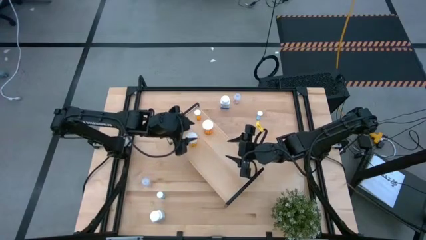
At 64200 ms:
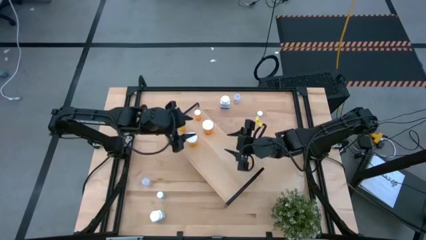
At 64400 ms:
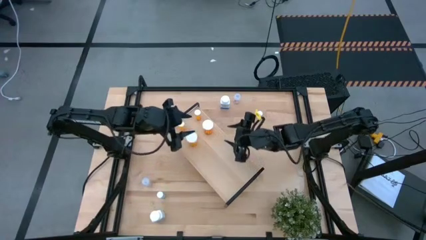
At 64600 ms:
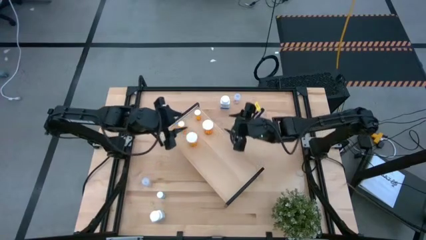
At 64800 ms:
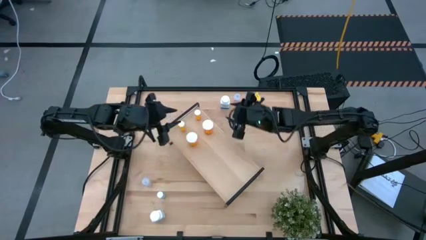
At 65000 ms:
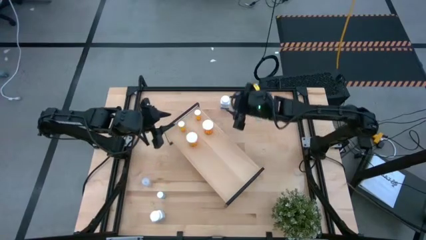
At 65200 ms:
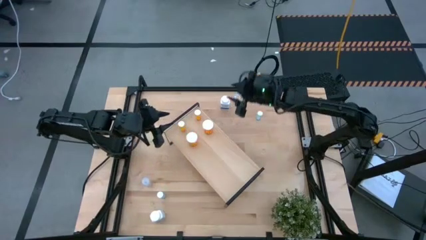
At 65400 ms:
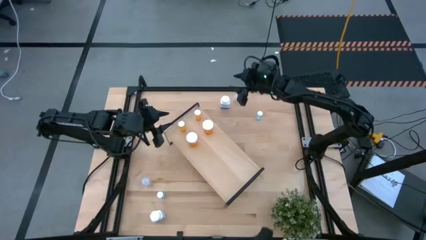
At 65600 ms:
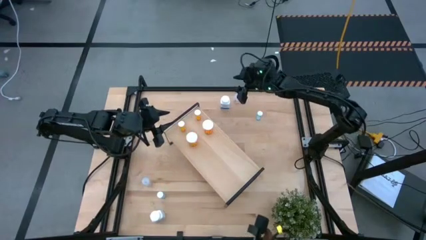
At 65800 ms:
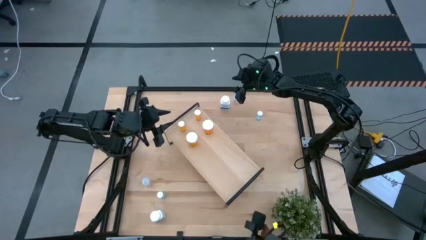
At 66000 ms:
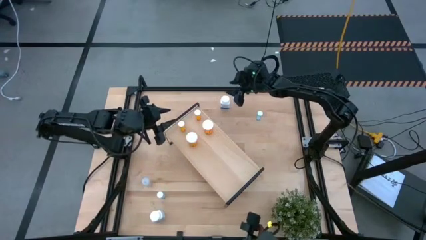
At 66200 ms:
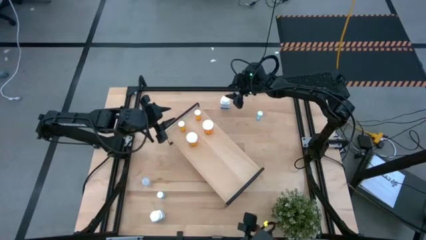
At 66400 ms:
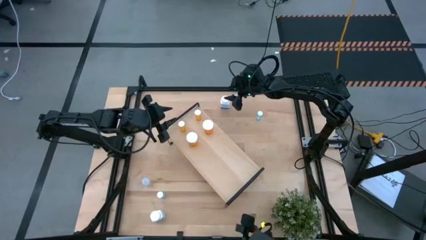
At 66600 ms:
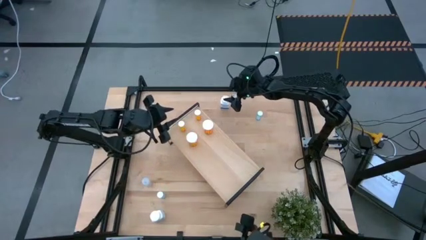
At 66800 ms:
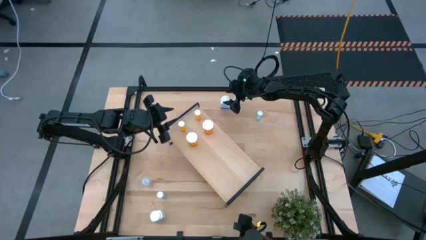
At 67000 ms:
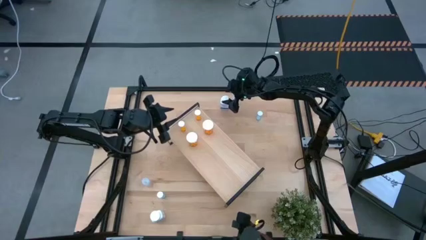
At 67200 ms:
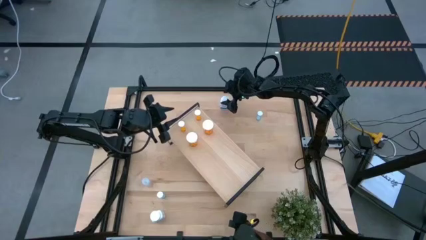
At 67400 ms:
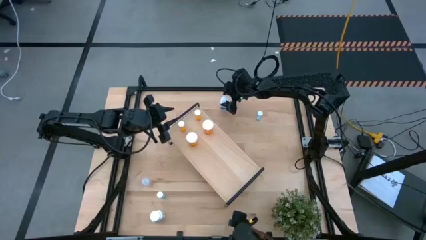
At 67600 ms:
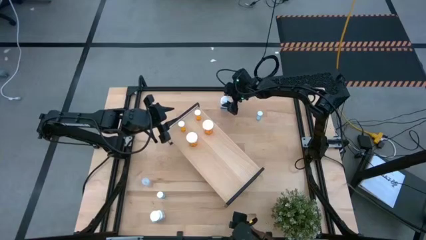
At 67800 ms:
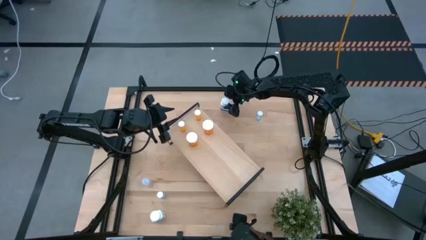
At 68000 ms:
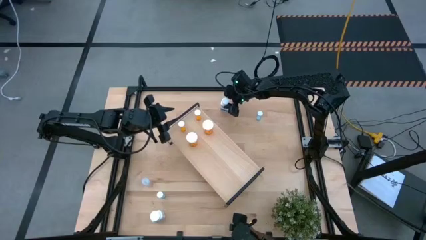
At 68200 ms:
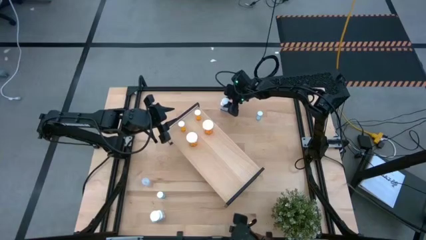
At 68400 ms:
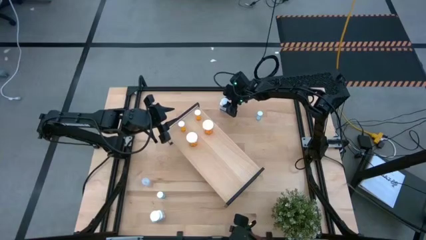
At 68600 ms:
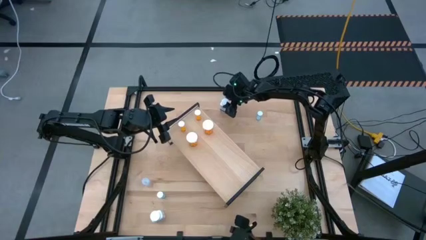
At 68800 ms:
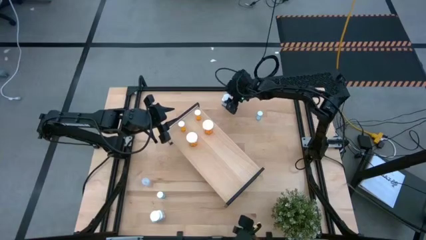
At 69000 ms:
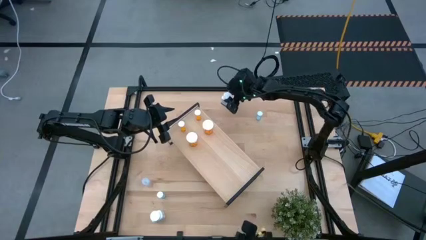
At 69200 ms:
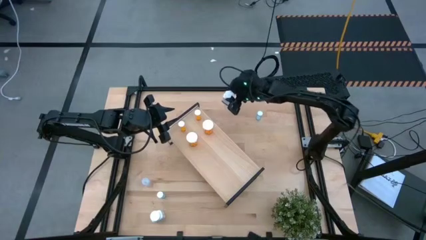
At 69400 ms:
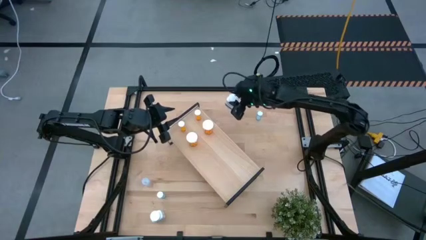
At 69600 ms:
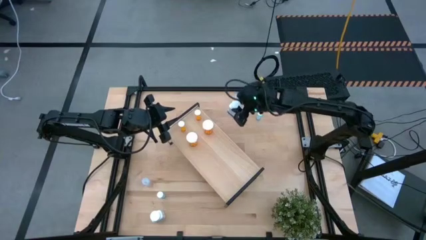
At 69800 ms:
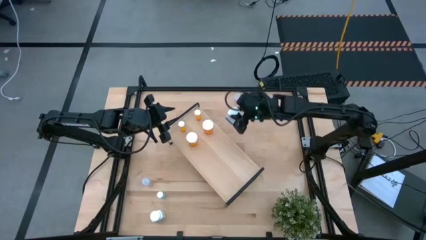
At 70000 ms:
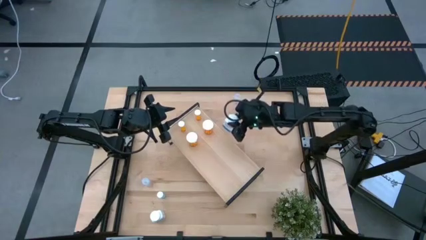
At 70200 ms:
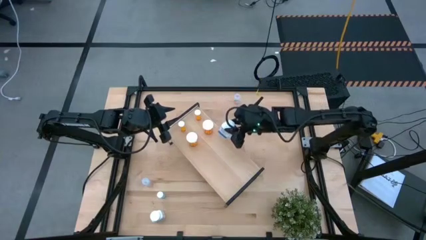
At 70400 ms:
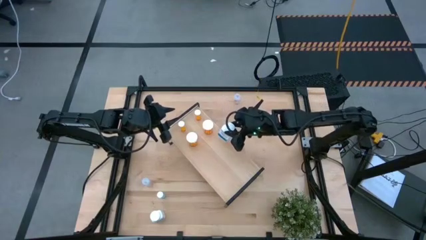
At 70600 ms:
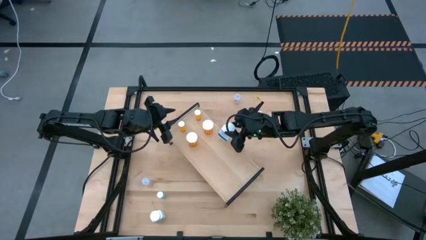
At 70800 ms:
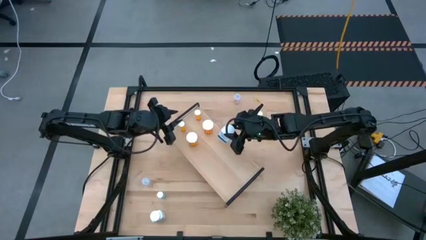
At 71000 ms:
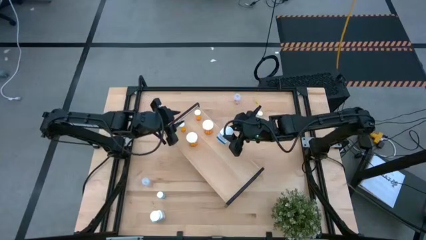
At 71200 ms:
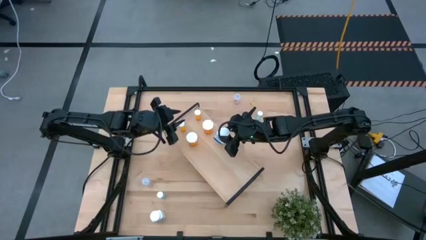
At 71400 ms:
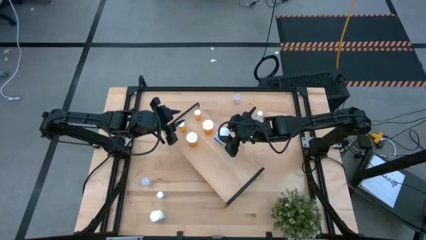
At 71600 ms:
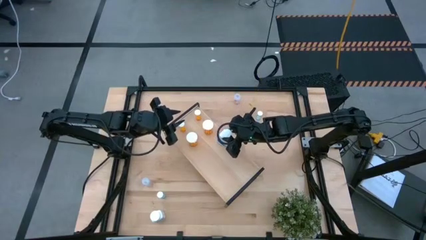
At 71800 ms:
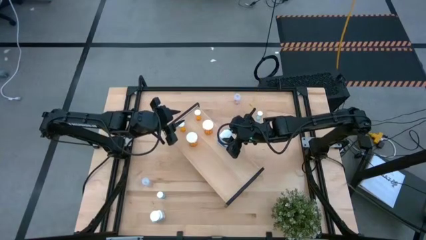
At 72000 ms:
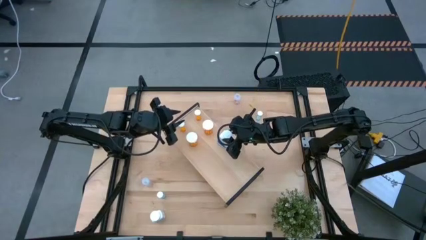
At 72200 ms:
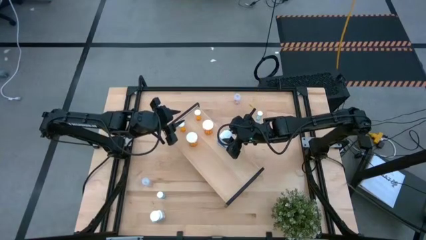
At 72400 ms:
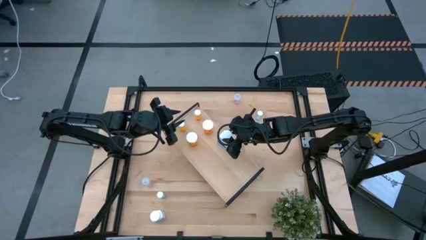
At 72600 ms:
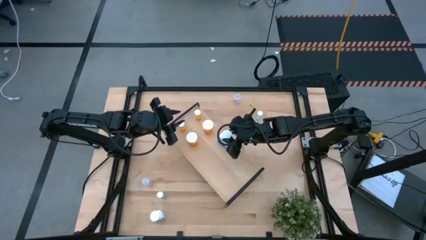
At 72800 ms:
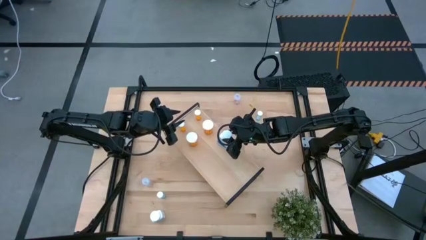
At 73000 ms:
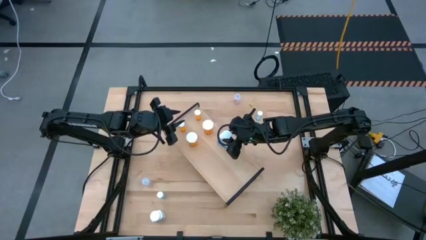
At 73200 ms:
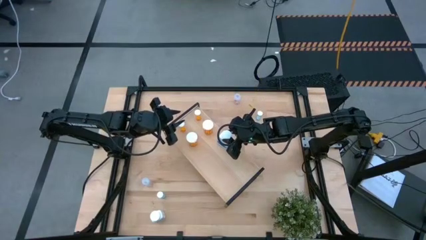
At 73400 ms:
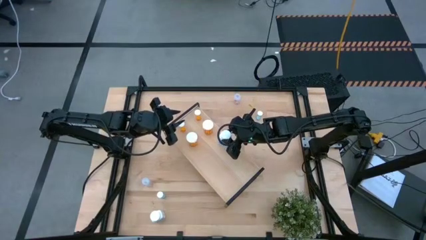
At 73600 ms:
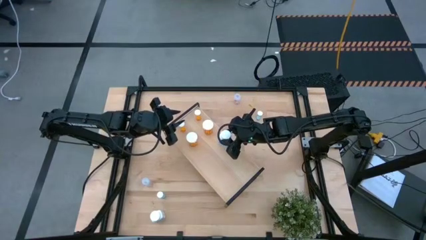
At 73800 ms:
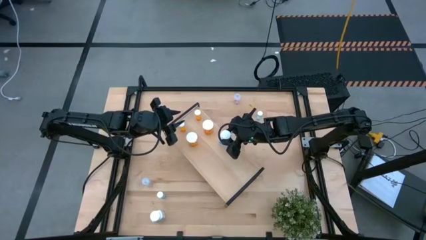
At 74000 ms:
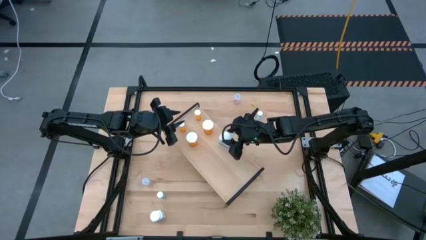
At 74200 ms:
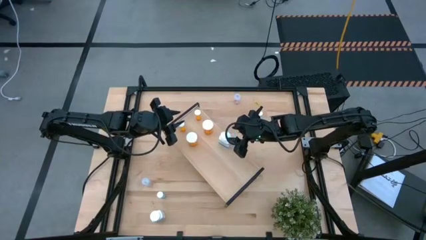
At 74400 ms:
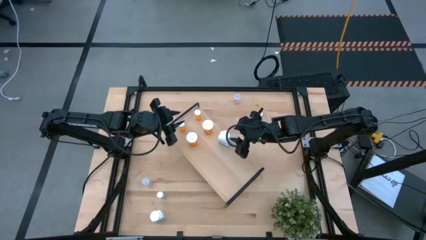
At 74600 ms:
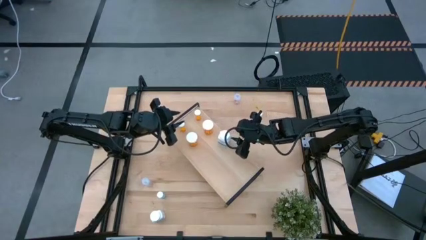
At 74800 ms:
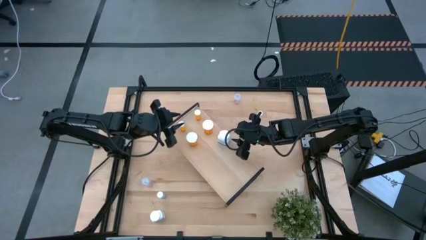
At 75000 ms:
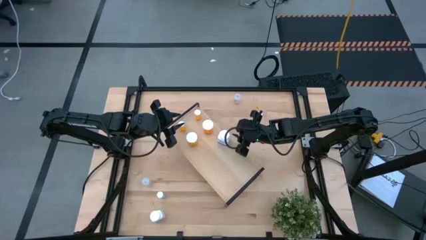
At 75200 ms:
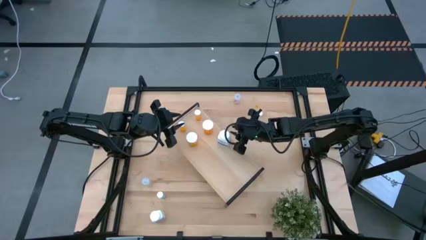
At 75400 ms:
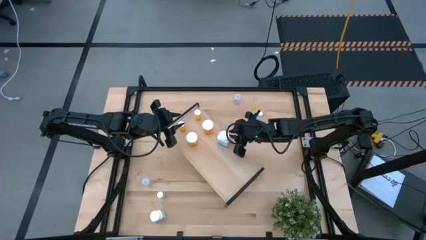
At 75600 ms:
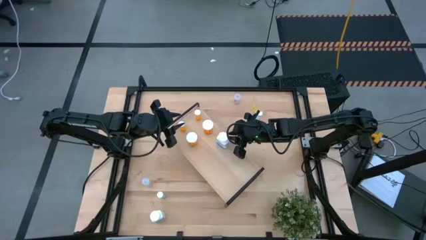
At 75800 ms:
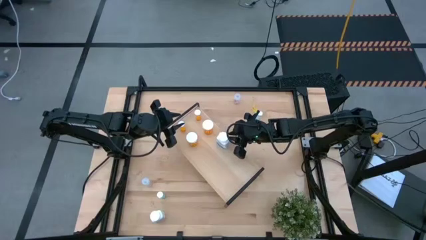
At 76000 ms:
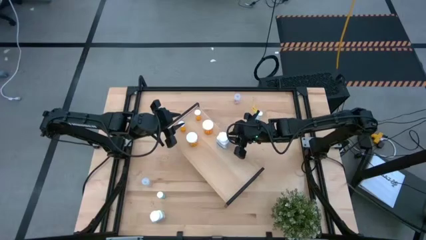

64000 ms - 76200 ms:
Task: Pick and place medicine bottles onto shelf by color
Put the top white pill bottle on the shelf
